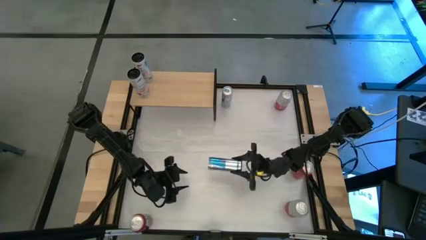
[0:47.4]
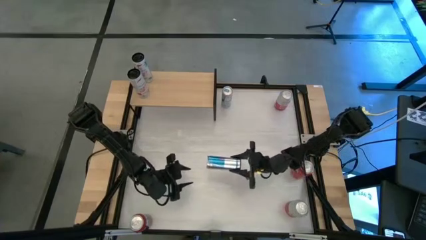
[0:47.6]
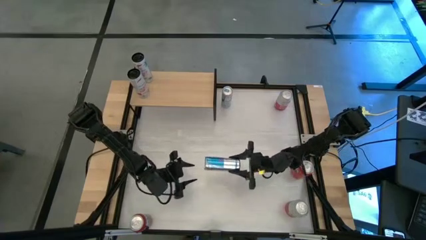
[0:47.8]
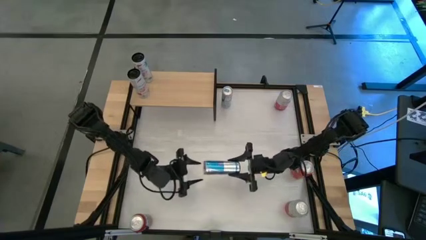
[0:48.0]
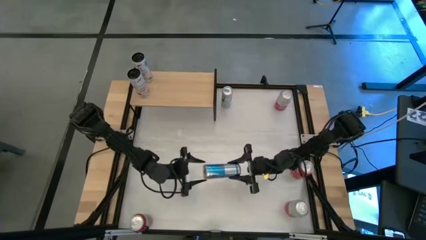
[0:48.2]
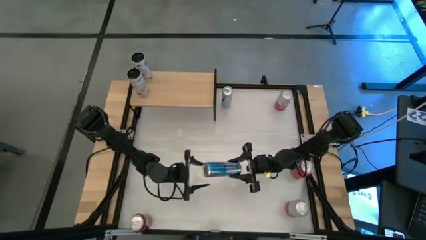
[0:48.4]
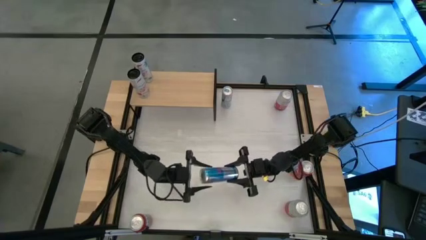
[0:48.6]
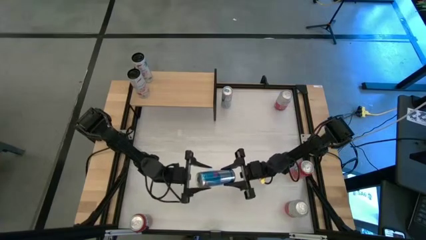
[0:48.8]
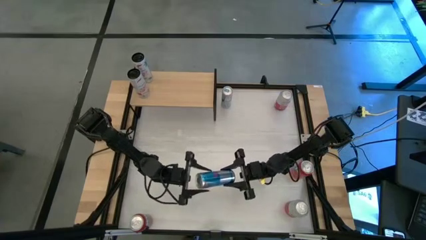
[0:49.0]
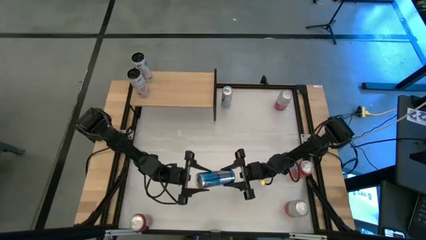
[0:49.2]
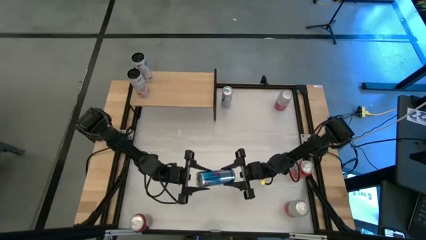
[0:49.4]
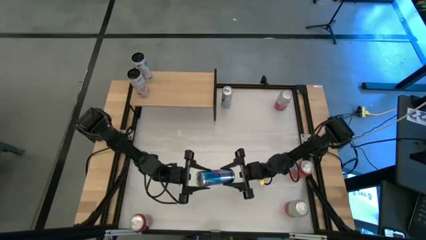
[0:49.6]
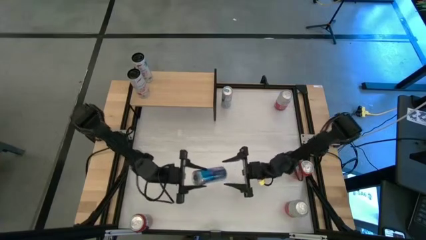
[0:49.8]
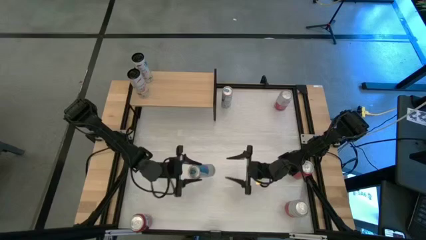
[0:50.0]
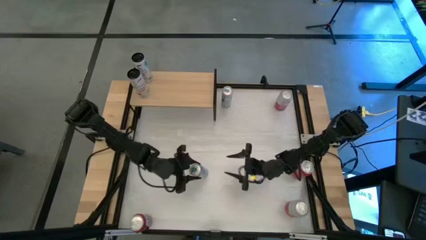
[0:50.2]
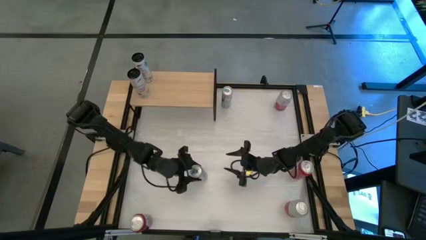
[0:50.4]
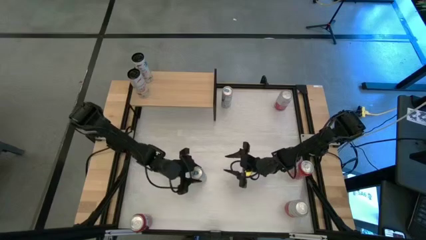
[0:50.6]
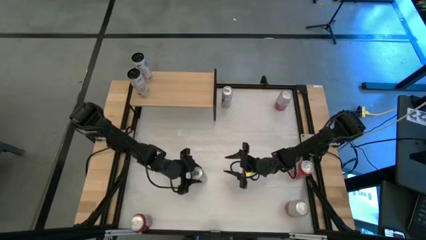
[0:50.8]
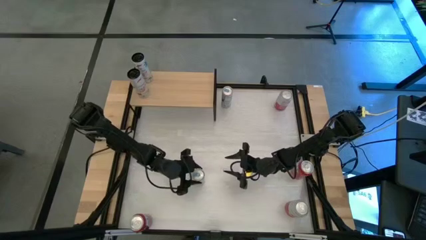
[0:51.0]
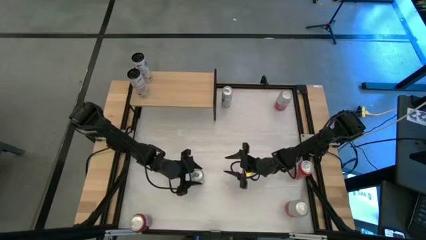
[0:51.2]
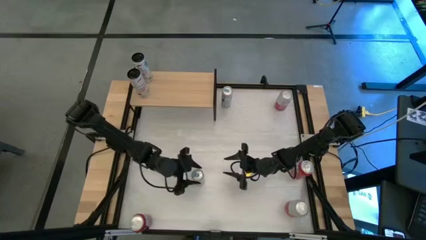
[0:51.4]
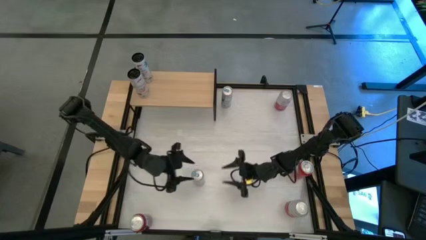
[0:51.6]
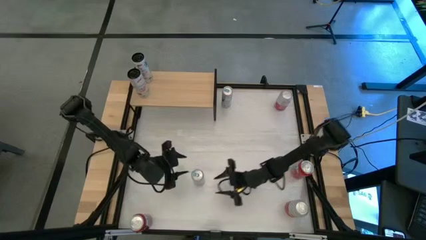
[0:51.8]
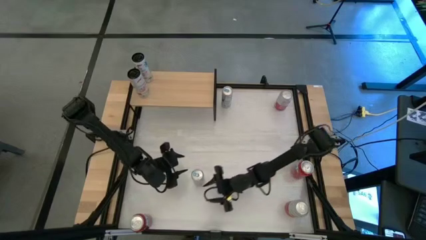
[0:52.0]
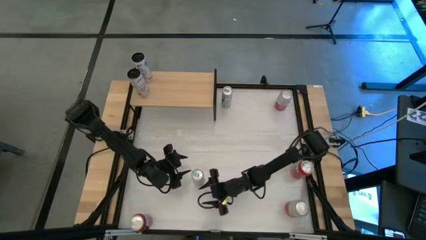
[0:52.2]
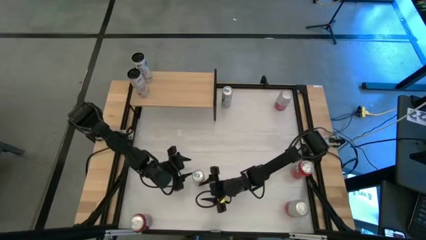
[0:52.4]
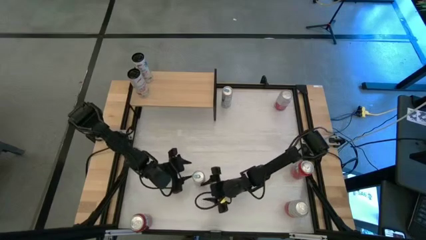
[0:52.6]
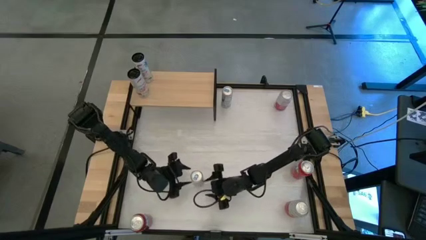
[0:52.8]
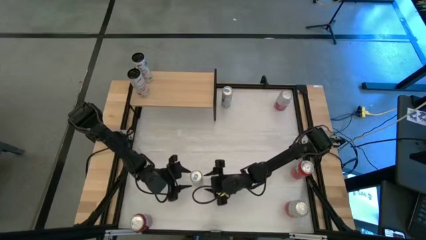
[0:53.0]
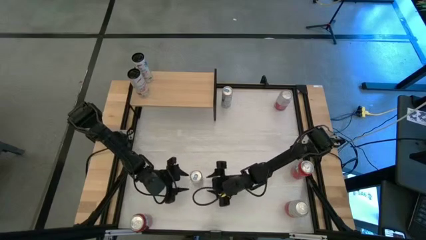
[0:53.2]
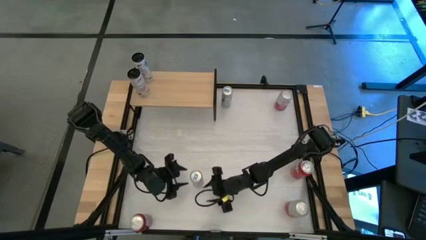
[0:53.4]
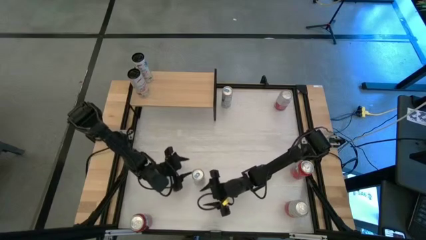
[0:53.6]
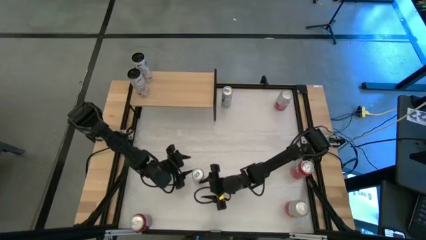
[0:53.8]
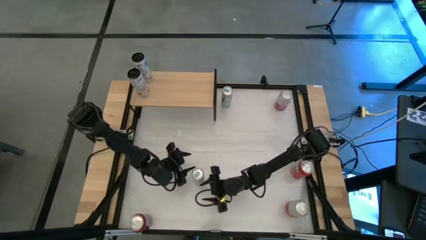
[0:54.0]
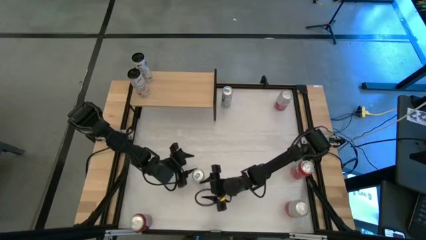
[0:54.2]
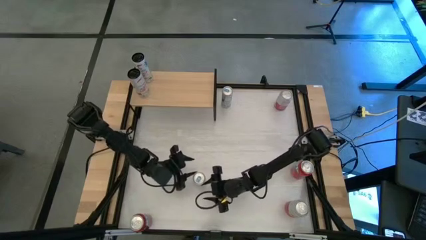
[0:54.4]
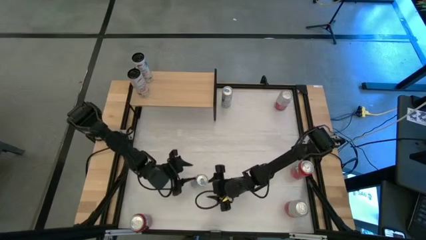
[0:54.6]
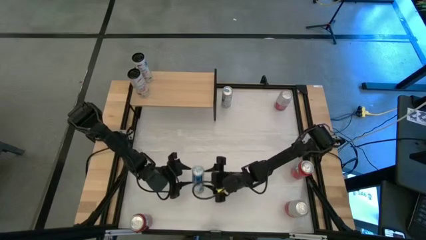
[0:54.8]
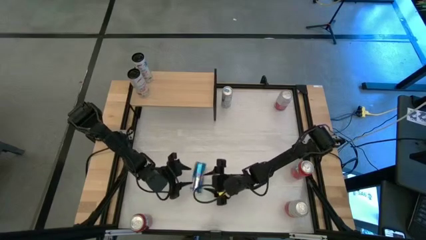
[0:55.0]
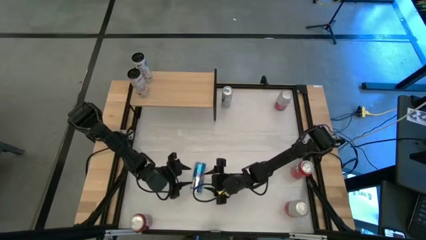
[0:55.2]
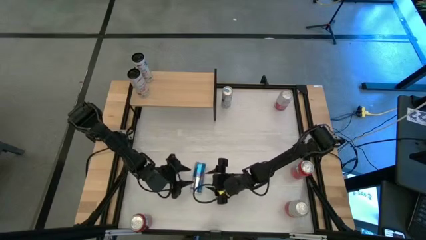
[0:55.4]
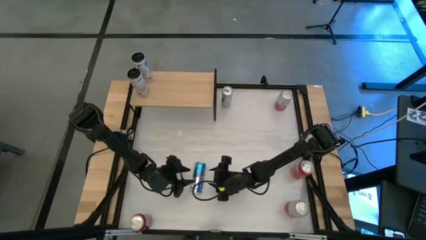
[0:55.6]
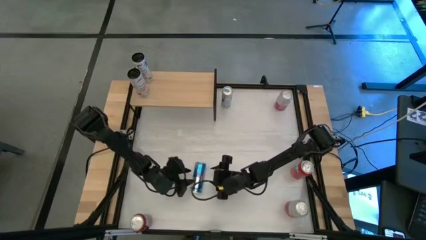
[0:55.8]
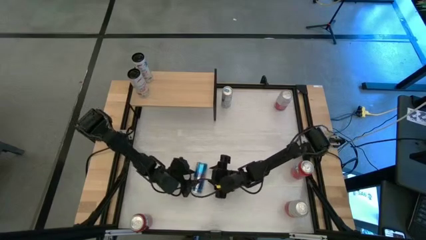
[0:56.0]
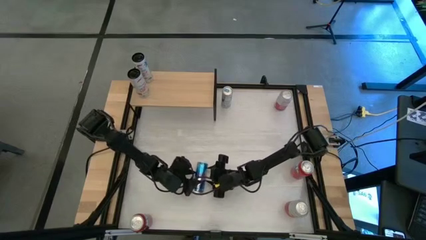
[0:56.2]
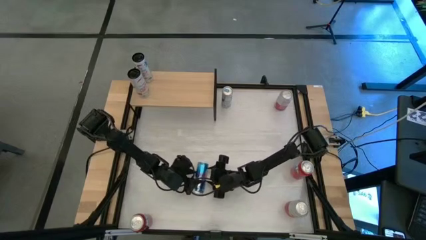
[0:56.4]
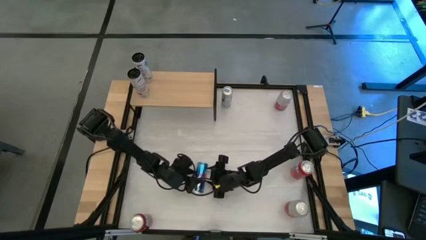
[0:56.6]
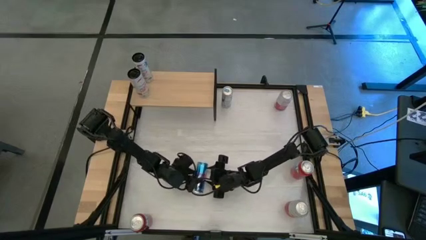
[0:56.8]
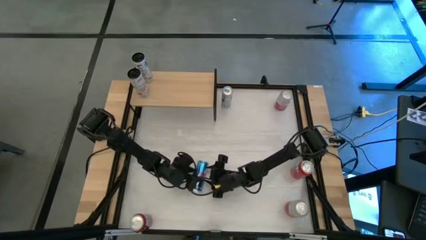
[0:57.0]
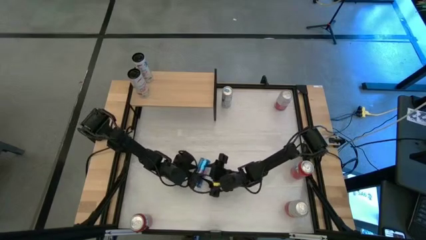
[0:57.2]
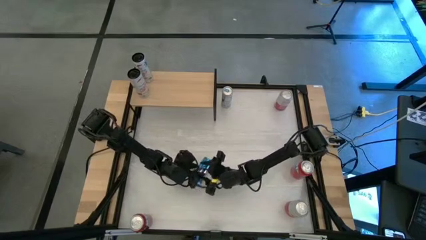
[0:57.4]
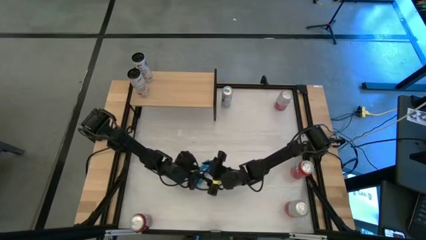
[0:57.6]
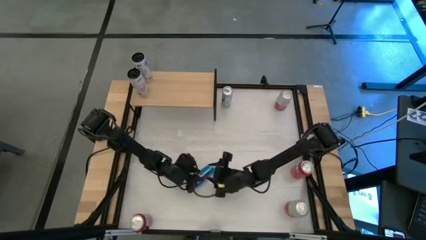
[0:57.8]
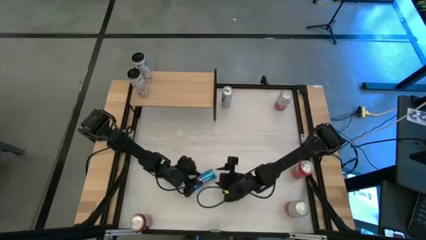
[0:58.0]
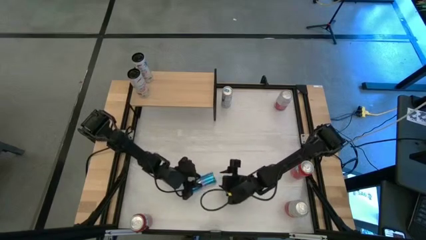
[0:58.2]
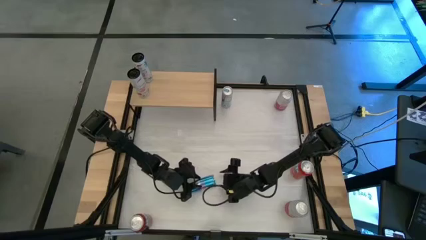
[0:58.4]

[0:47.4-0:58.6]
Task: Place canned beverage on shelf
Put the bottom blue soda can on the shelf

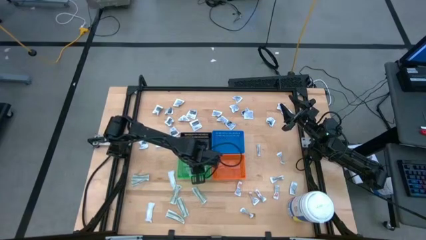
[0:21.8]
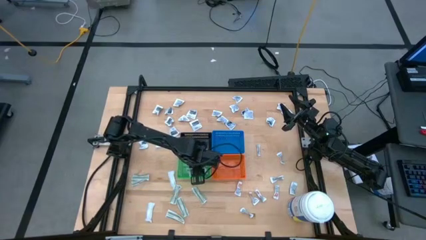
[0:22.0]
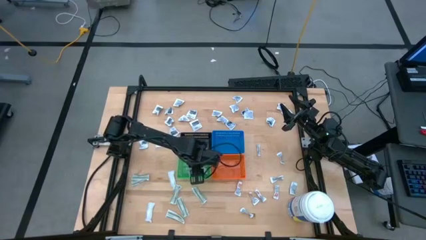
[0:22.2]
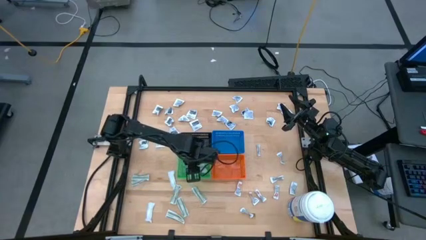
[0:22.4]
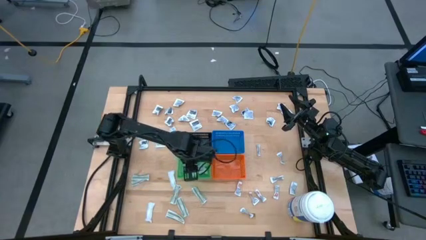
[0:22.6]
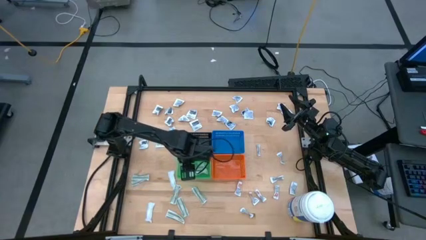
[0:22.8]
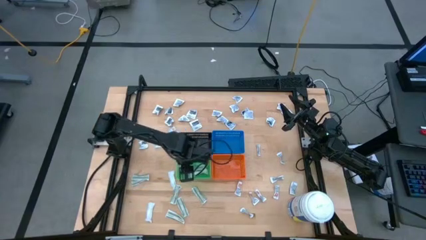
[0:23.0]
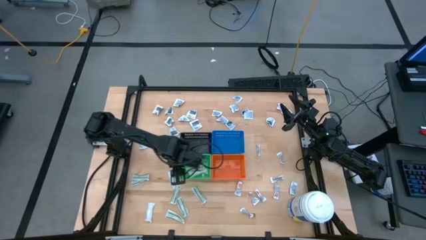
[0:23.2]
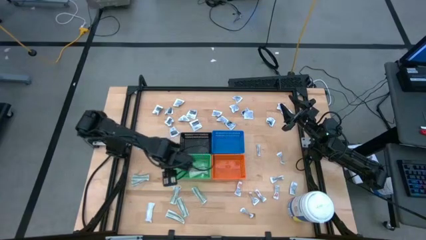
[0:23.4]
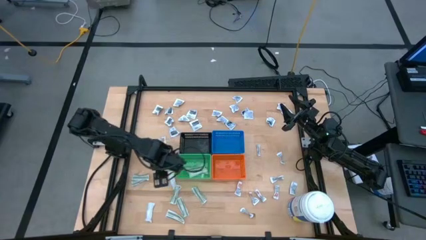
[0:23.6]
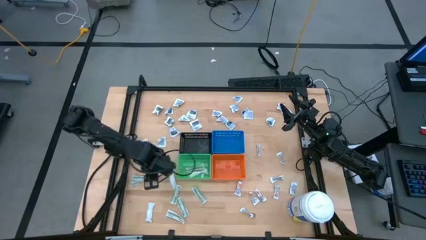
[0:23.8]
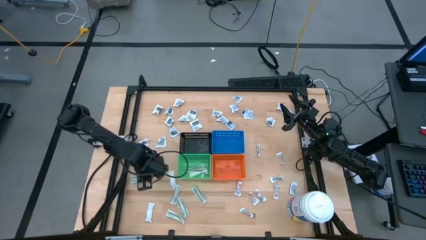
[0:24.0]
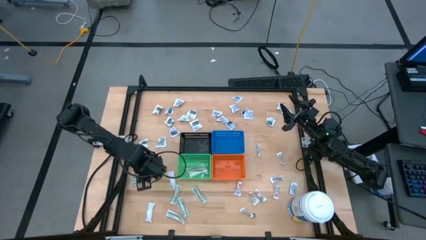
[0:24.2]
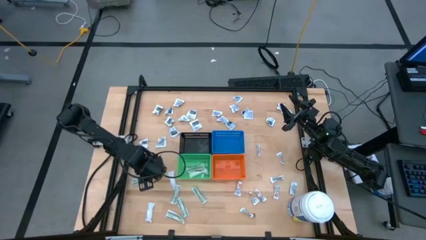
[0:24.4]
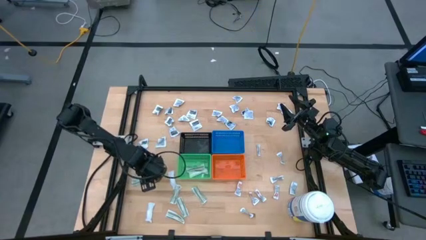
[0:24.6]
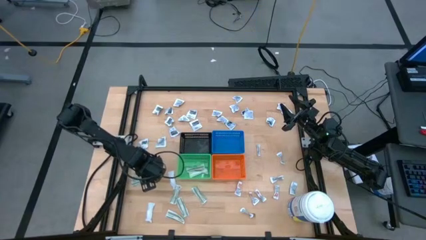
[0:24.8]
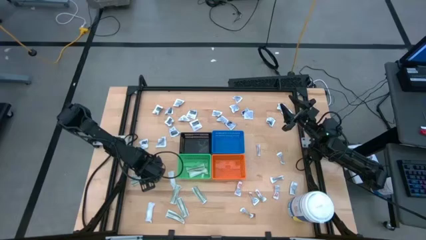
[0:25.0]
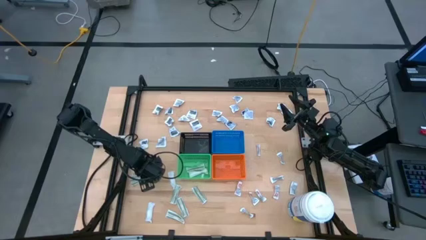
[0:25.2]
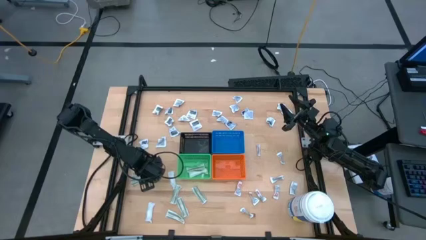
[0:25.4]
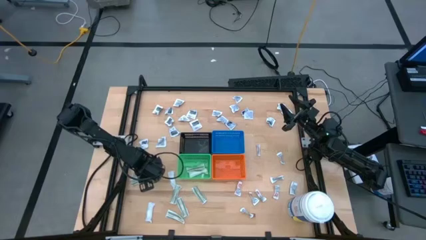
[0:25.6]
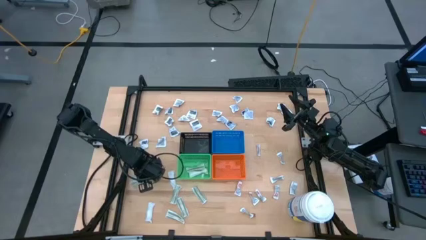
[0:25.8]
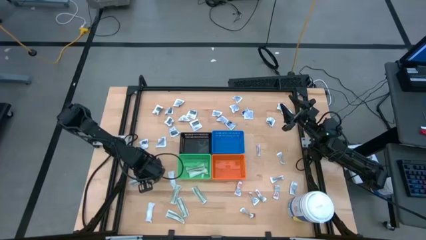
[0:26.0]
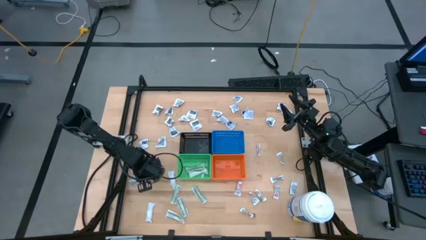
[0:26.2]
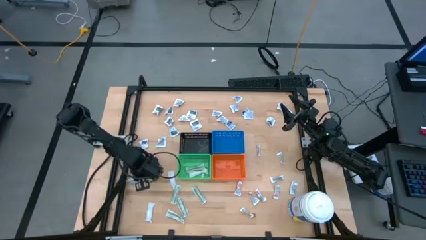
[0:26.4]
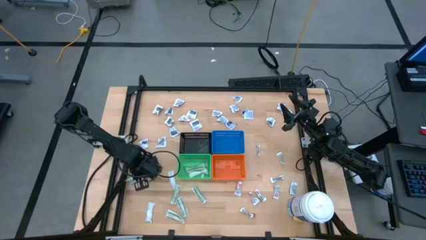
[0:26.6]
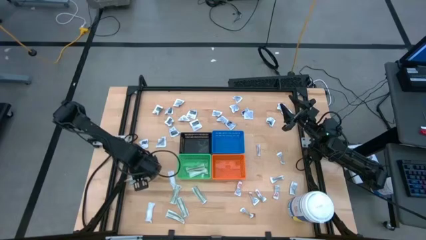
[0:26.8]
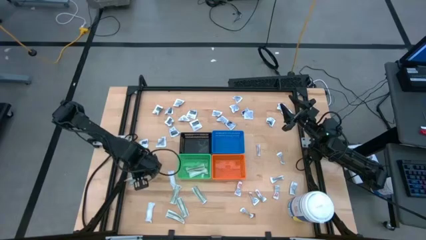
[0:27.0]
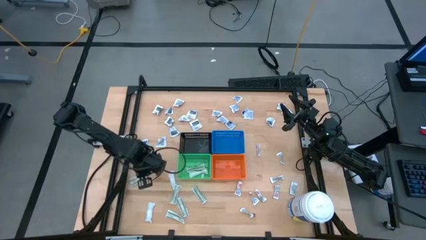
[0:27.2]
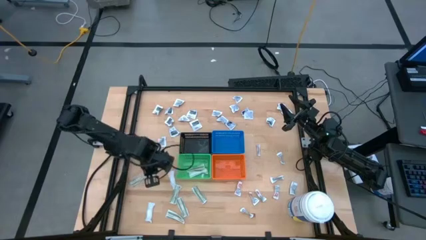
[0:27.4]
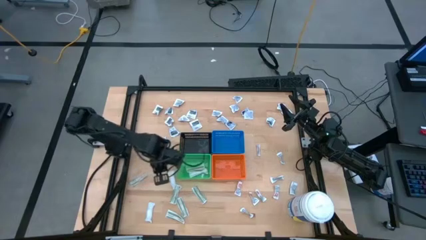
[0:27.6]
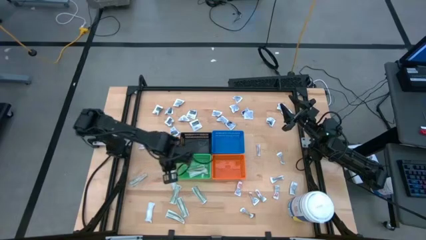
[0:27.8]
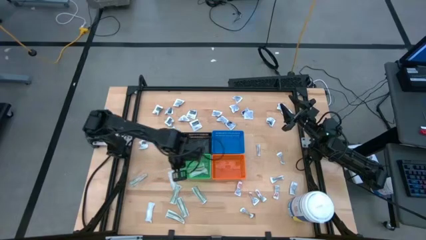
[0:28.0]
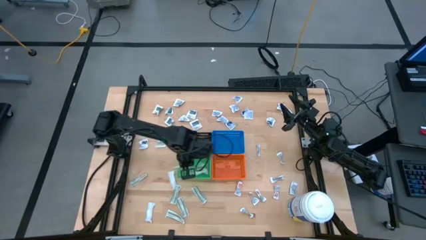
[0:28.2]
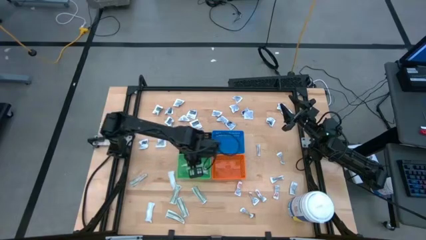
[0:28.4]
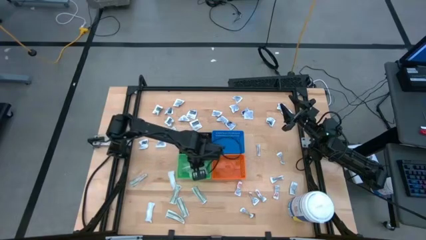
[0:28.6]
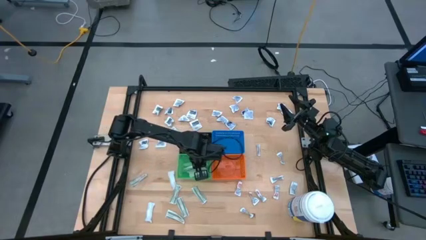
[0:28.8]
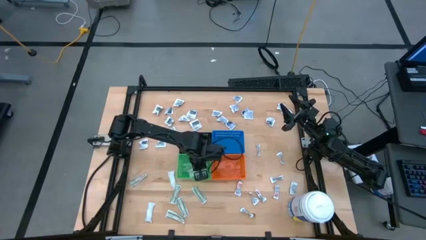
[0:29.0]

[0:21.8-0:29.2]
Task: Pick & Place First Aid Supplies
Put the bandage into the green bin
